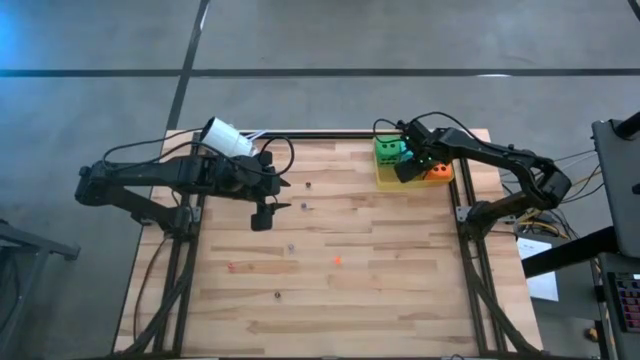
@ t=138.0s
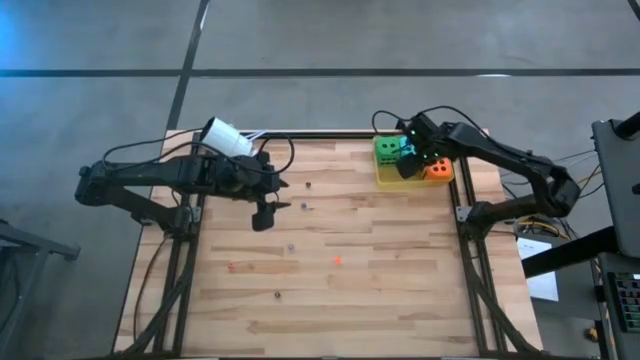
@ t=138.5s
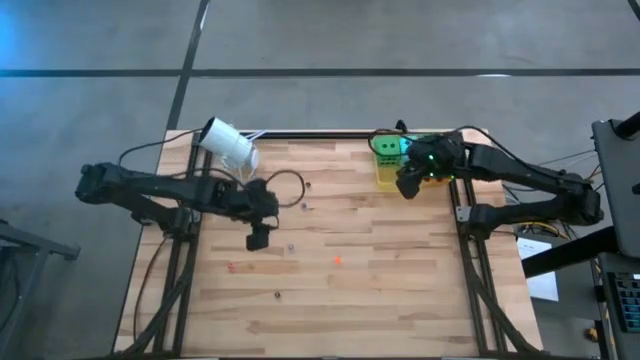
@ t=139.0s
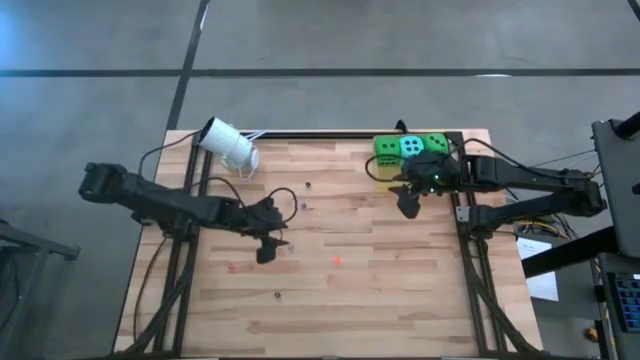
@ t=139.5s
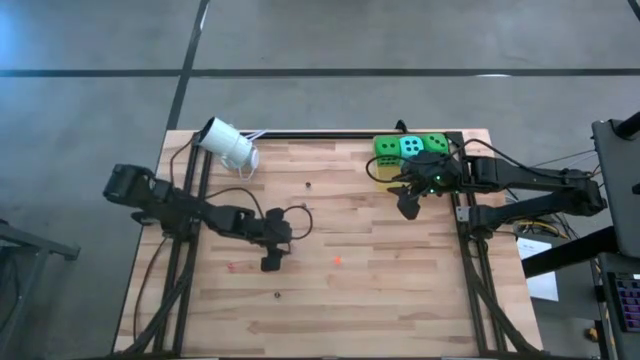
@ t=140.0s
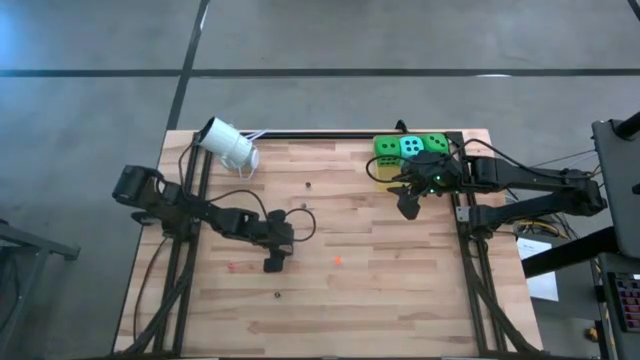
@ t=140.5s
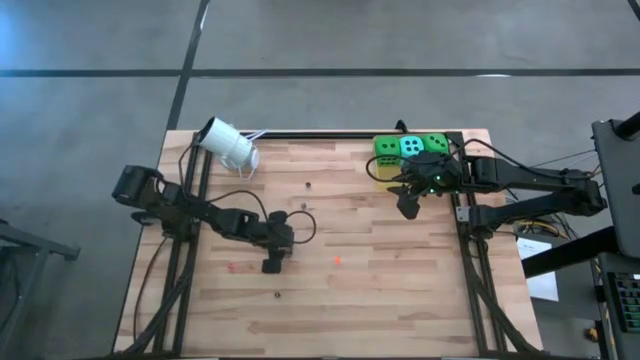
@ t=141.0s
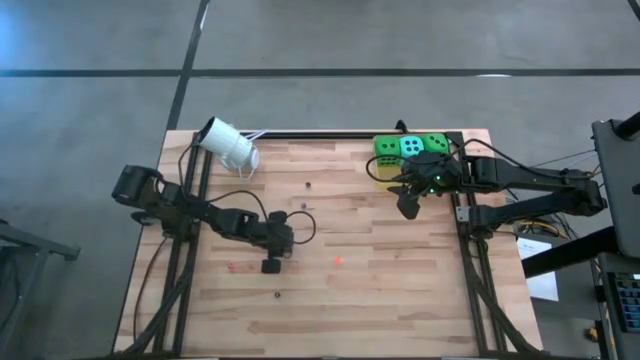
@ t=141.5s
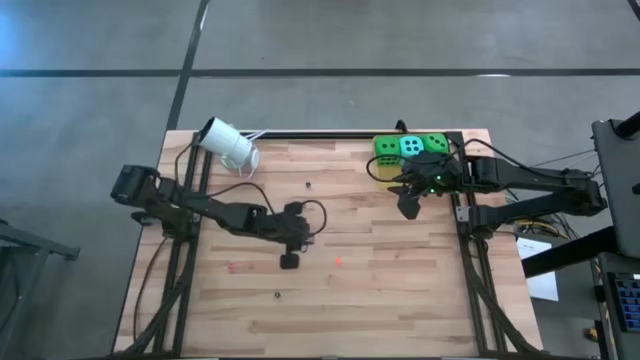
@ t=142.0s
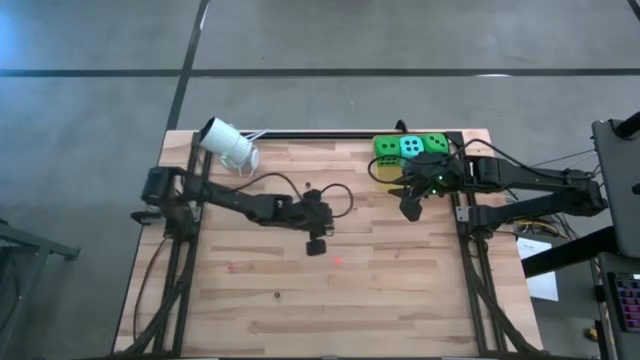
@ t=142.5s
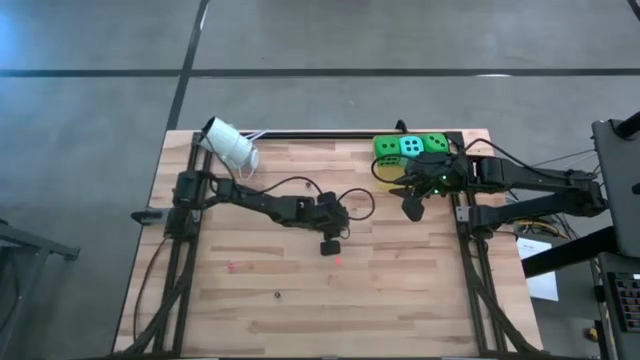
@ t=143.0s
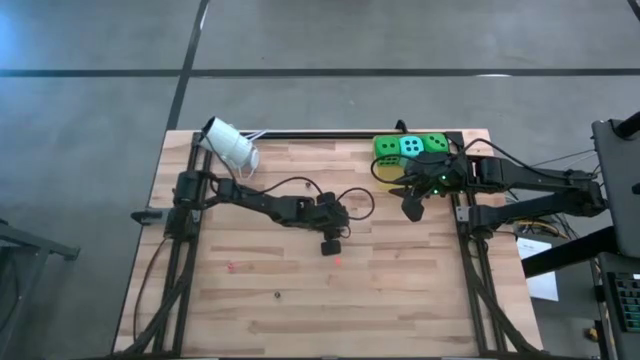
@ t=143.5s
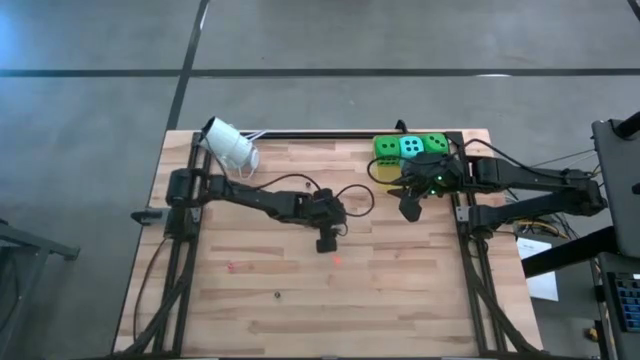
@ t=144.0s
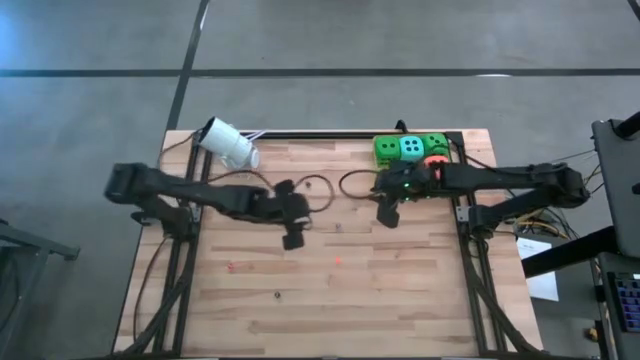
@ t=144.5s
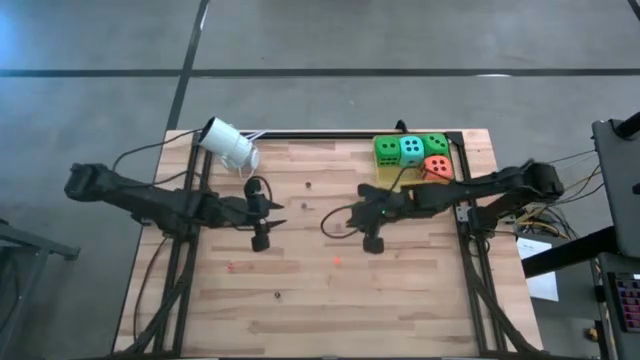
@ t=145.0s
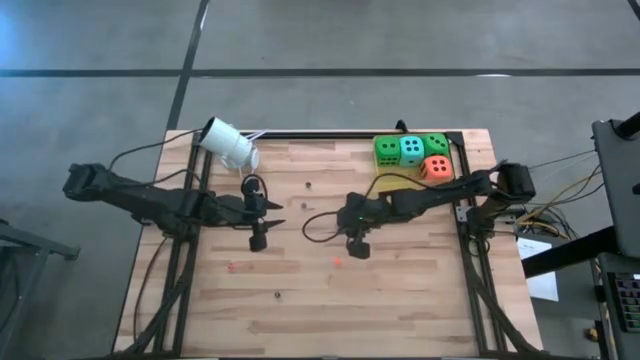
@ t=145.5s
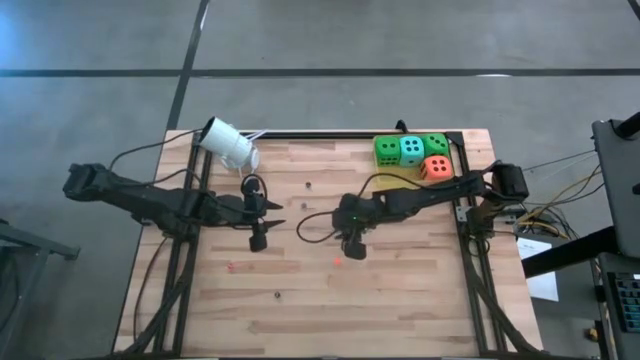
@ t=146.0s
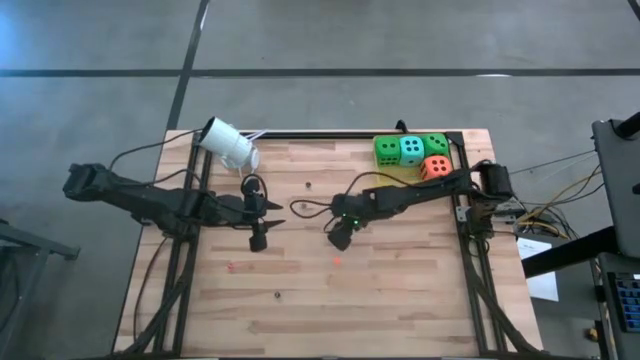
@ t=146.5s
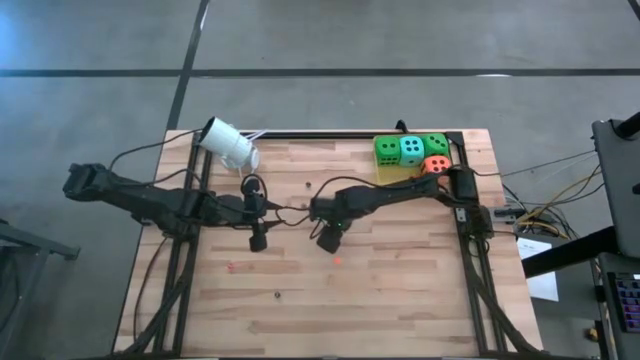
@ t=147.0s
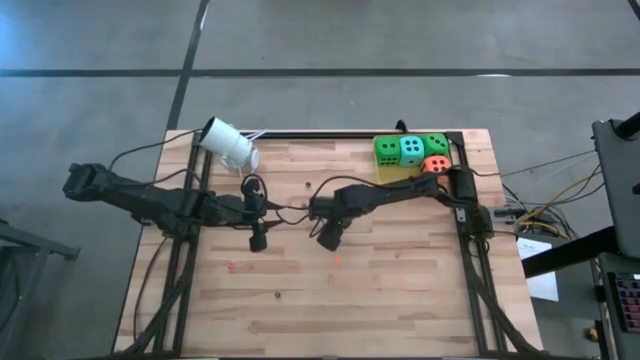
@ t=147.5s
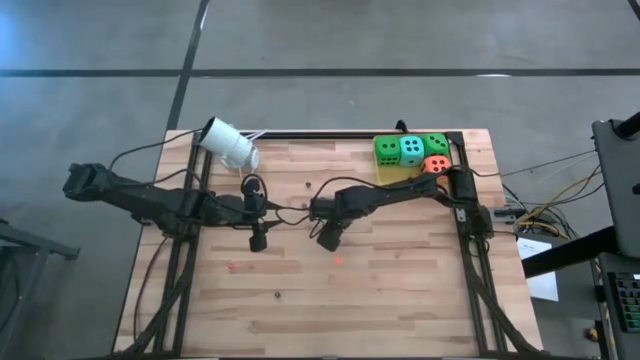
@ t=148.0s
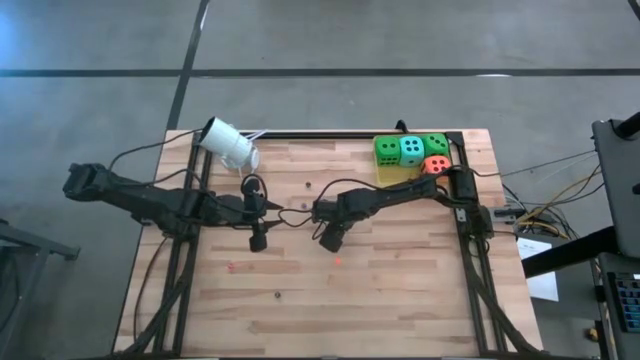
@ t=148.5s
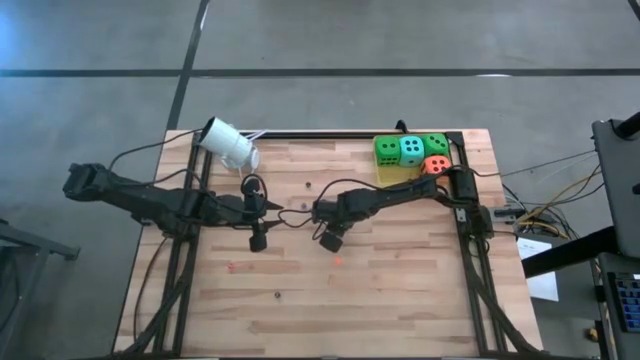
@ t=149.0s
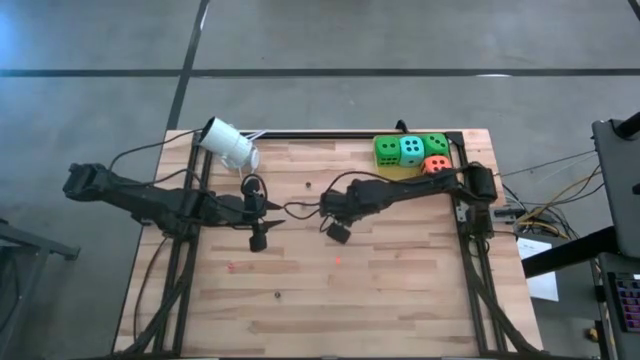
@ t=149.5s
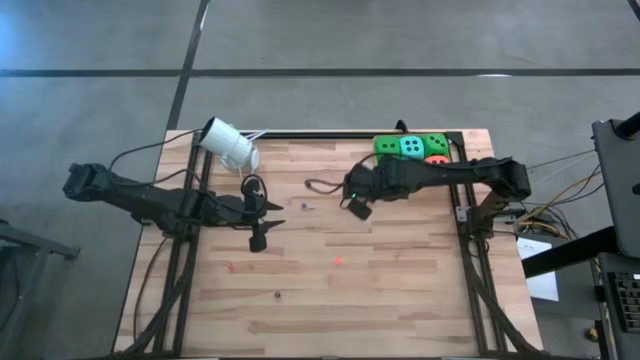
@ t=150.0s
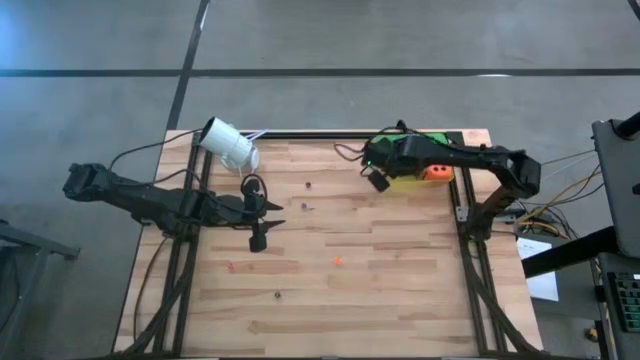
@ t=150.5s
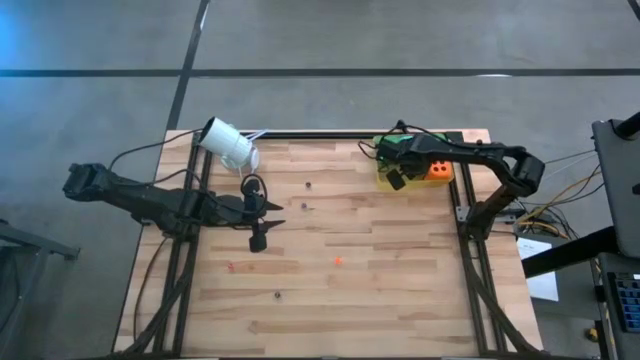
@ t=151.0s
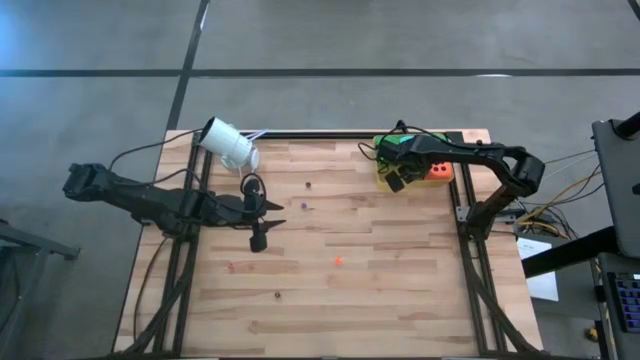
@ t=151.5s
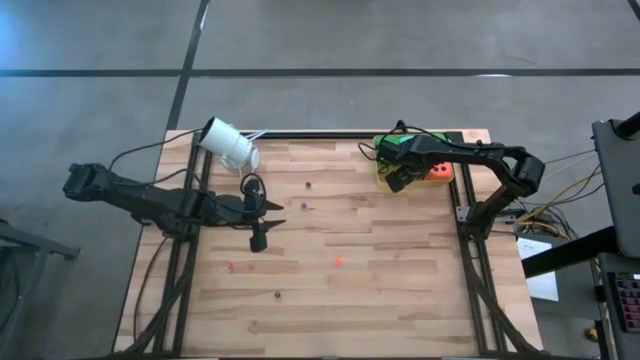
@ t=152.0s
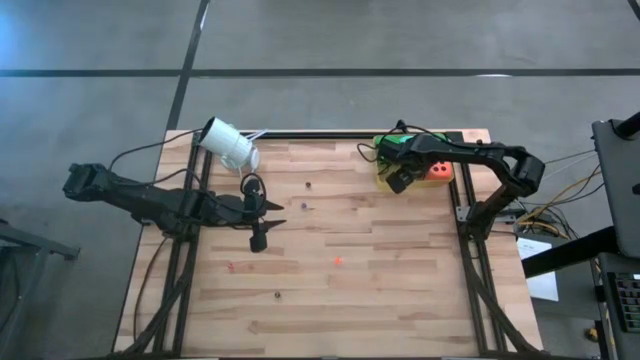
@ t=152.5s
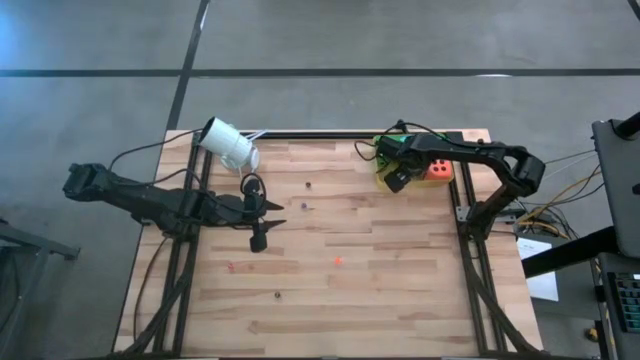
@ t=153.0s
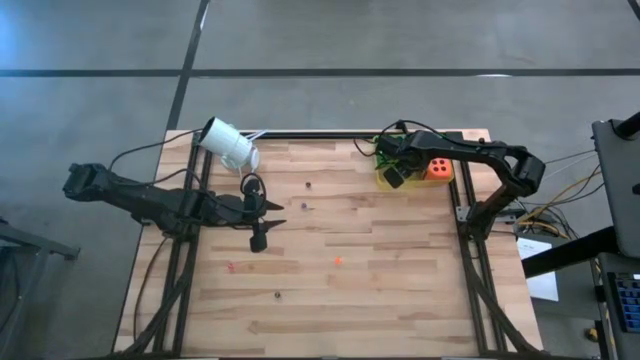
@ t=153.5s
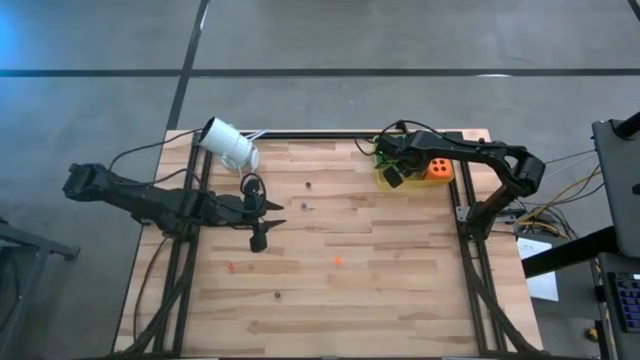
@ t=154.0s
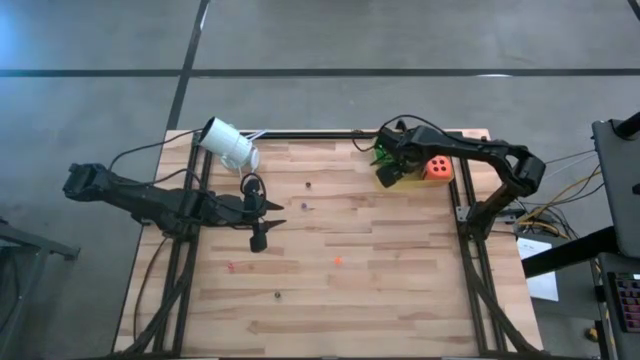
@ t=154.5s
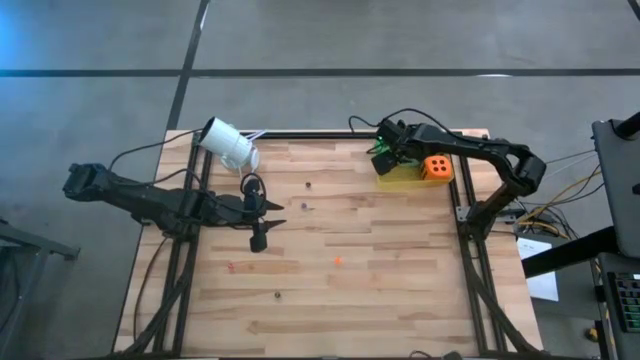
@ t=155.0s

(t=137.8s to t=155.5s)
Task: Pick & Place Dice
Put the small purple dice into the yellow bin

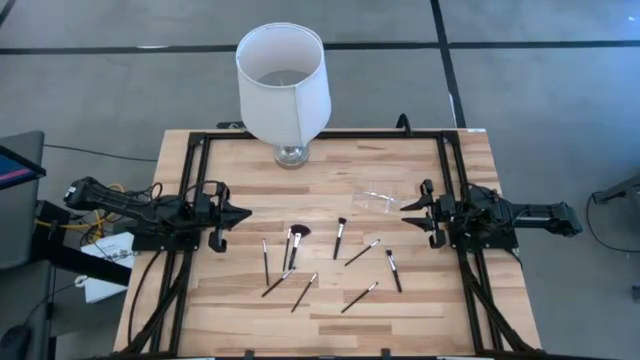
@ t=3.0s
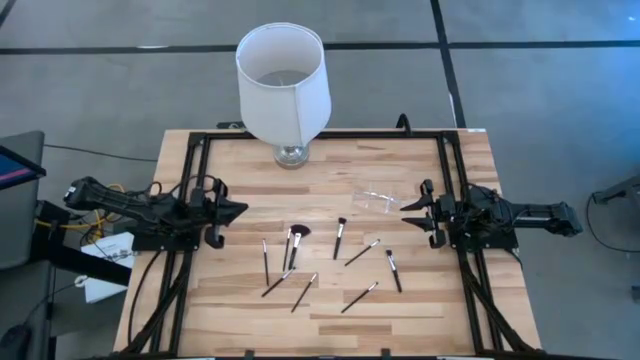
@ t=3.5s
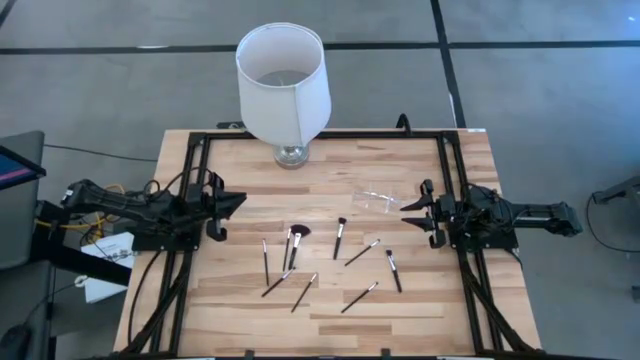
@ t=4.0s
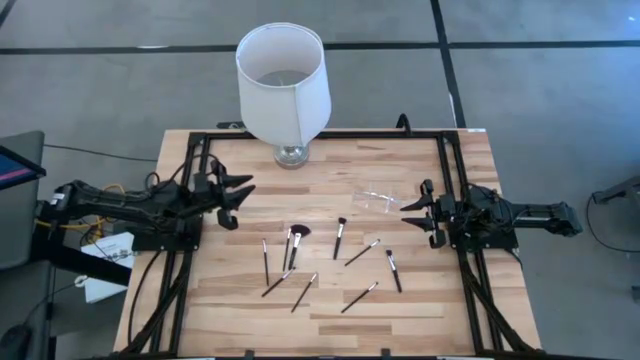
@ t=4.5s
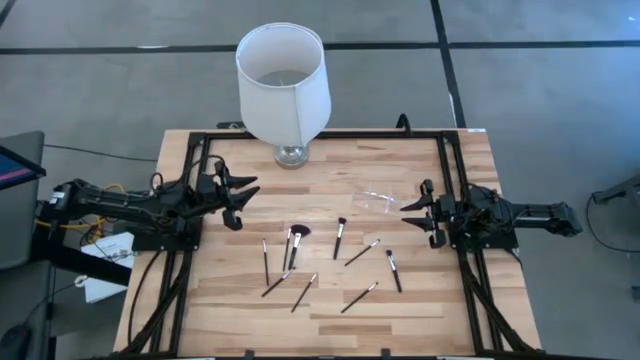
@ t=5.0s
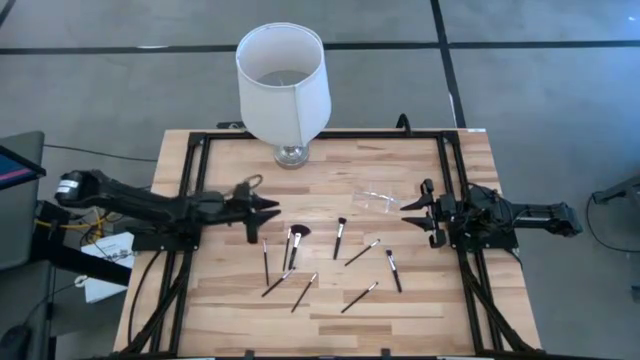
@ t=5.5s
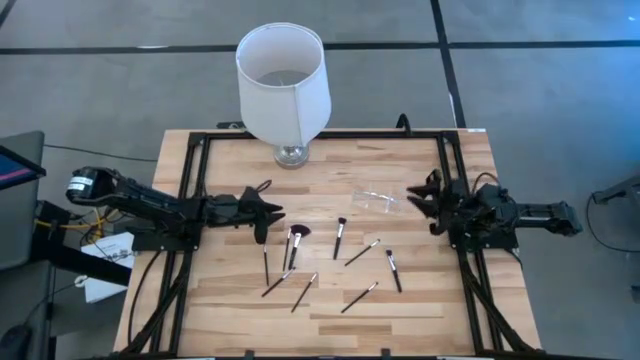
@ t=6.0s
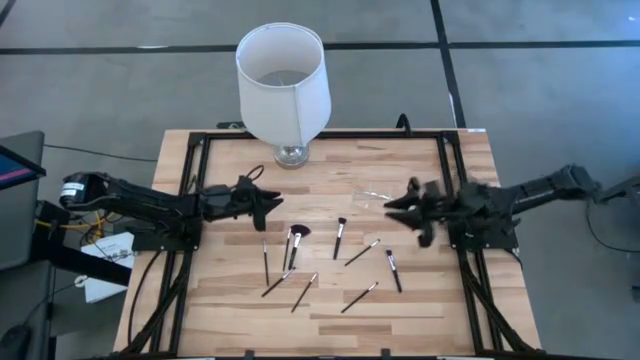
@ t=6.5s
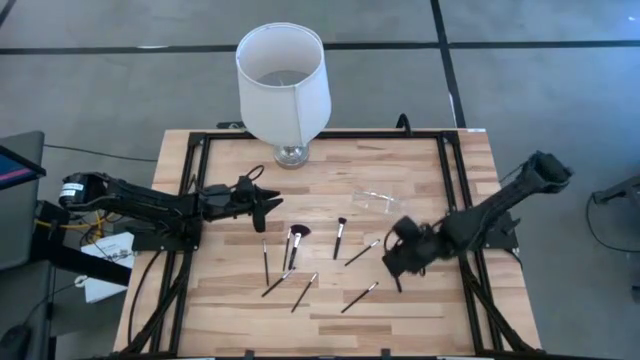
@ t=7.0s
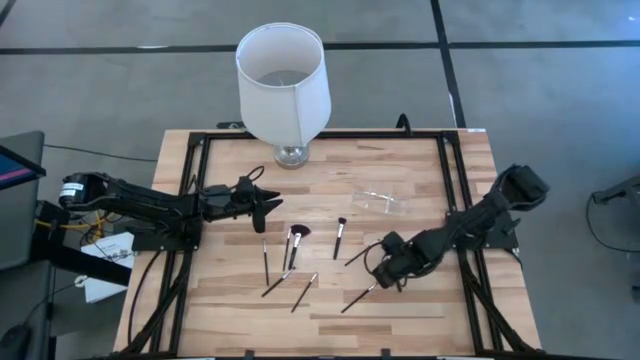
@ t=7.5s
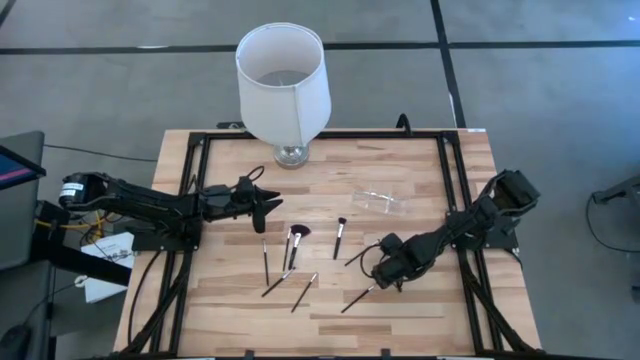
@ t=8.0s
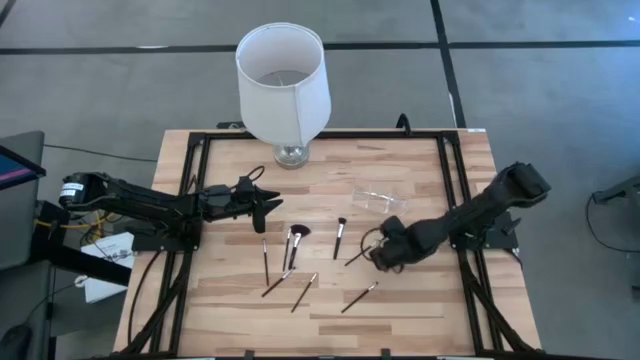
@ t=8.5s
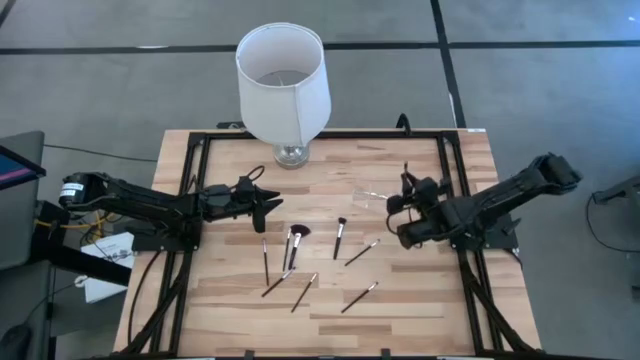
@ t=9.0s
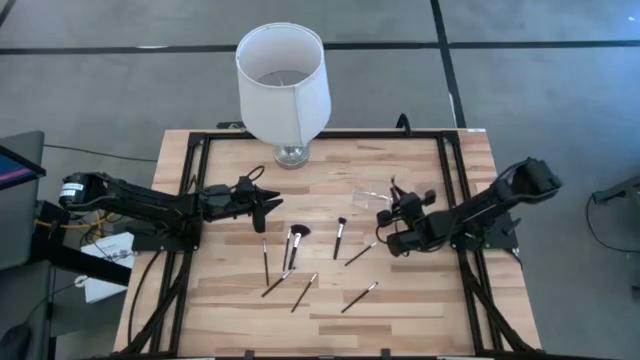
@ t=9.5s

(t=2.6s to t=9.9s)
Task: Pick & Place Makeup Supplies
Put the black makeup brush into the transparent organizer
